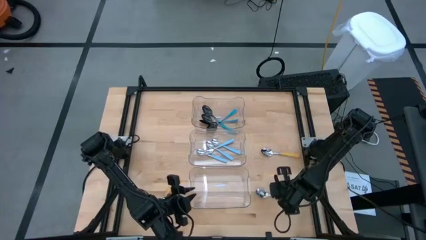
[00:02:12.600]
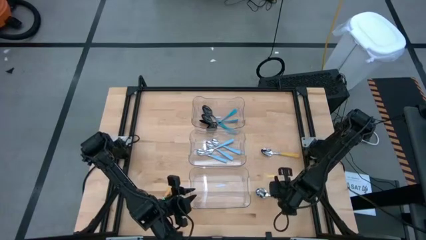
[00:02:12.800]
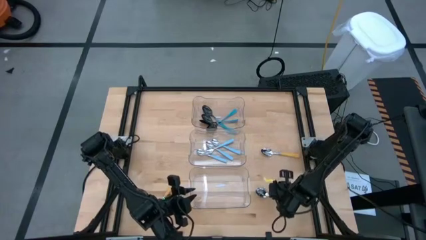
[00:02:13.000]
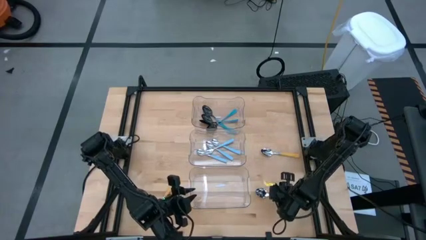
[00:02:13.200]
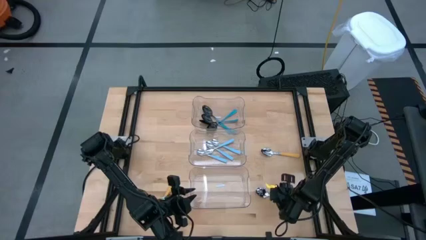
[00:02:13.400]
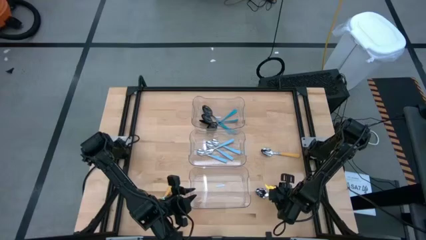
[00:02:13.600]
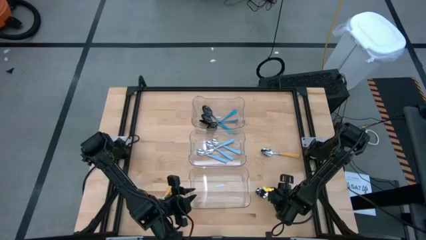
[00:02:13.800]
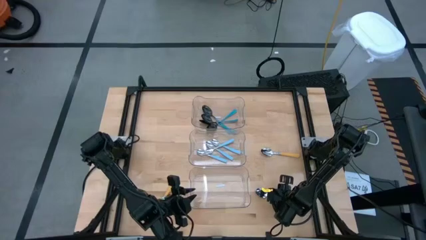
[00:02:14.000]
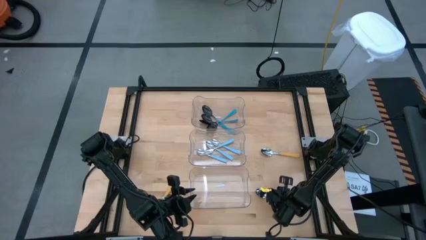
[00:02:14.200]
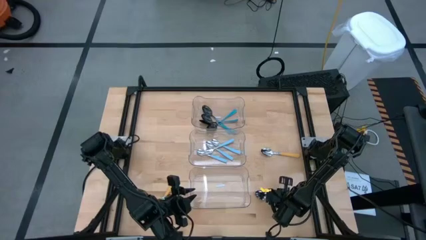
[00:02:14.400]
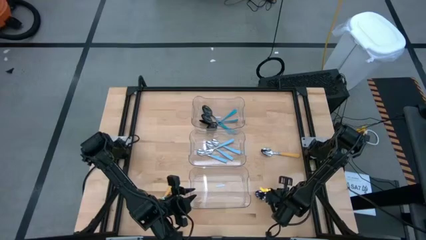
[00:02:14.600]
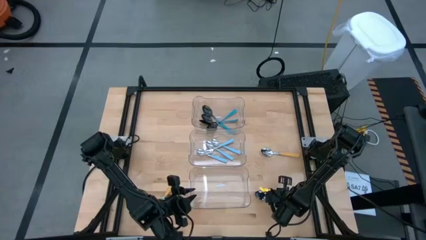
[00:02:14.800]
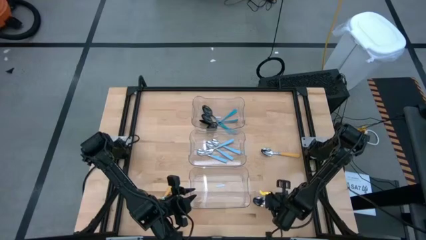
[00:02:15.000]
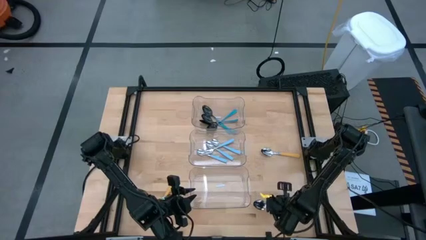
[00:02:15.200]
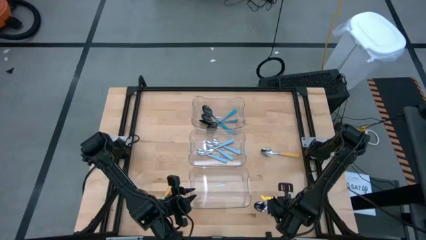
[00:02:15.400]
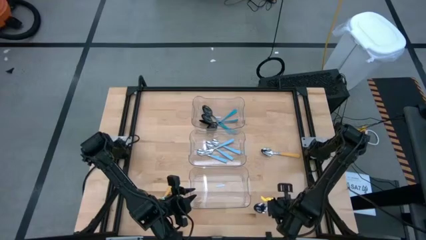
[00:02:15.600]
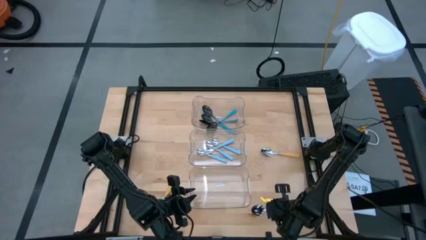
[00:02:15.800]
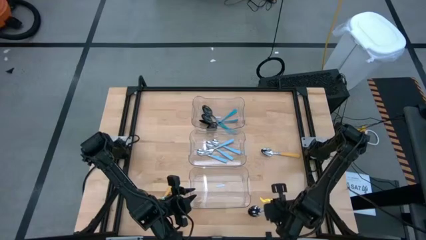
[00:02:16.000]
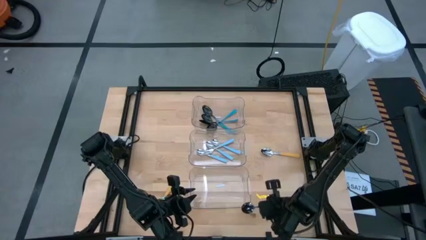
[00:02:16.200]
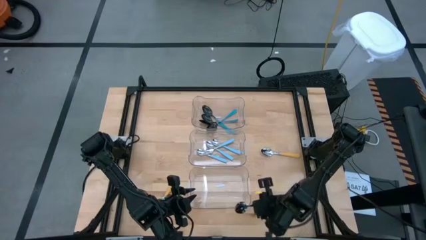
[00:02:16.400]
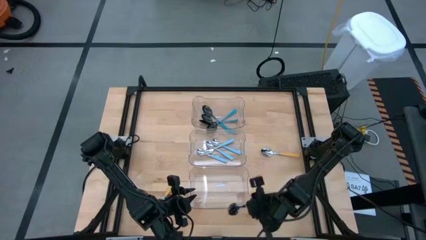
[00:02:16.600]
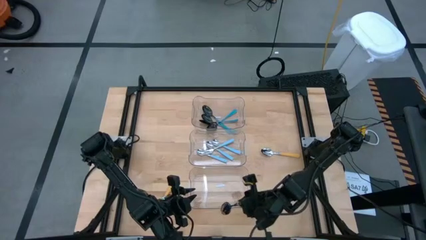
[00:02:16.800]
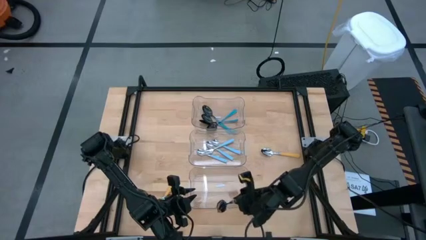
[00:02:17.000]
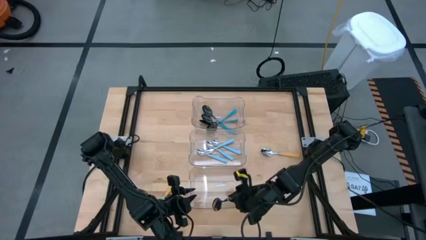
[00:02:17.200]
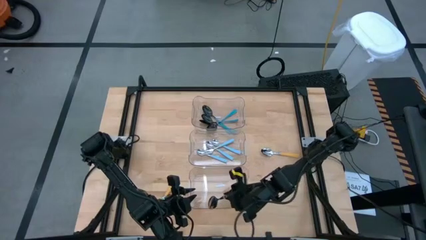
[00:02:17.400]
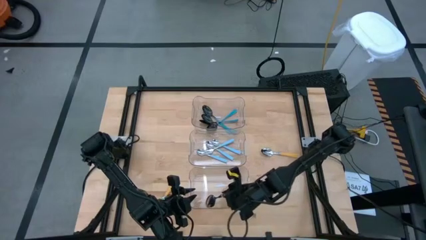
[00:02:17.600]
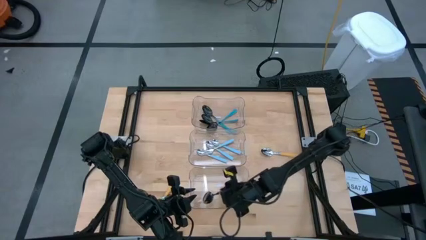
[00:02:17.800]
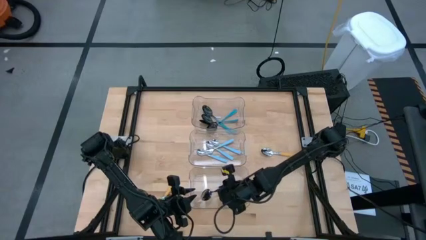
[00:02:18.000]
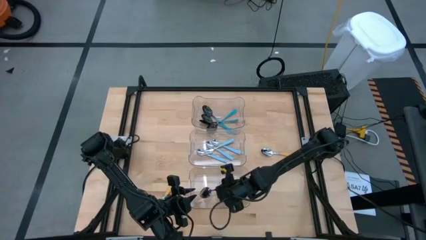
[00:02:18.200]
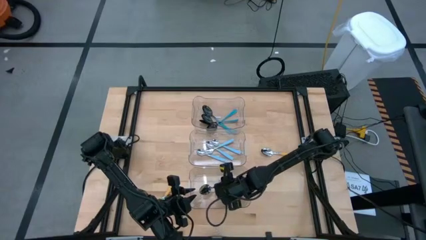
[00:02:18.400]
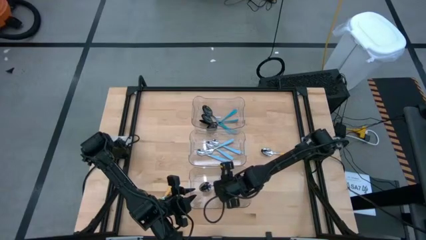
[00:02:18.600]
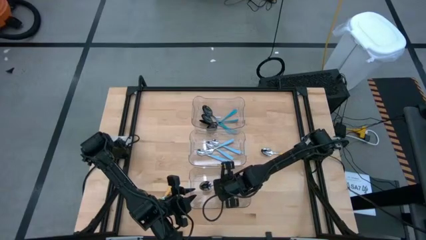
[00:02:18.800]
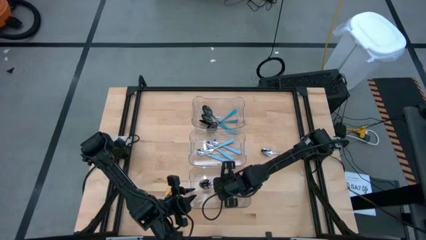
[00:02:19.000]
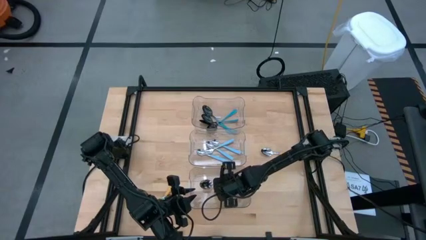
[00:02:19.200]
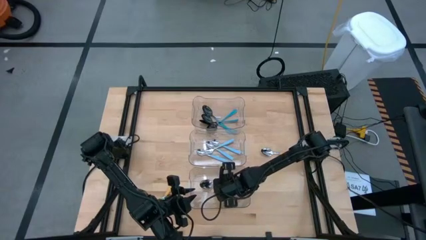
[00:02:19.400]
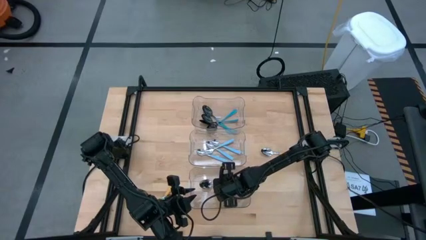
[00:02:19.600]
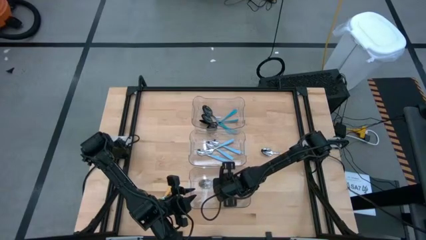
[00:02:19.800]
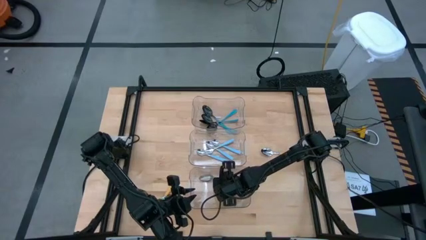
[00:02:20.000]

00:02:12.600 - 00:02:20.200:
Task: Sort silverware by color (type)
Put the yellow spoon into the bottom transparent bin

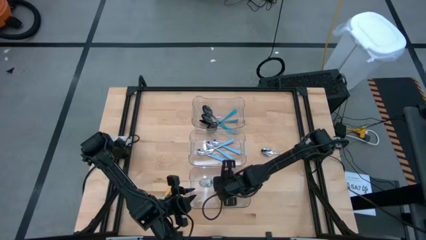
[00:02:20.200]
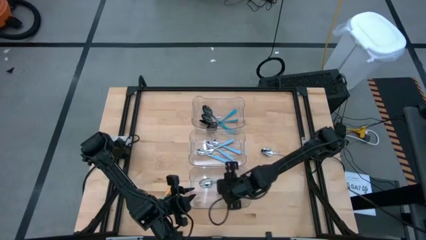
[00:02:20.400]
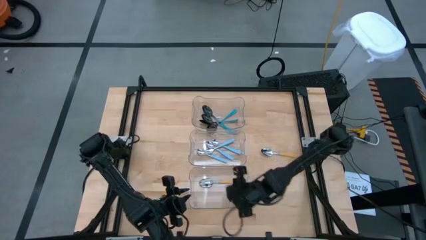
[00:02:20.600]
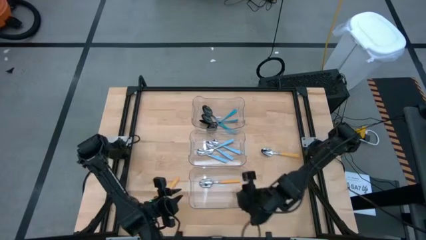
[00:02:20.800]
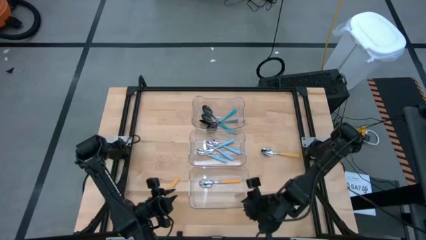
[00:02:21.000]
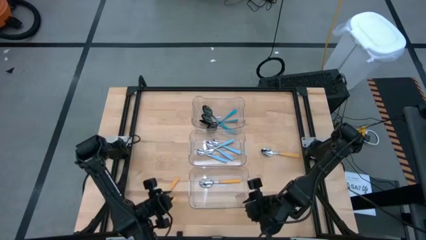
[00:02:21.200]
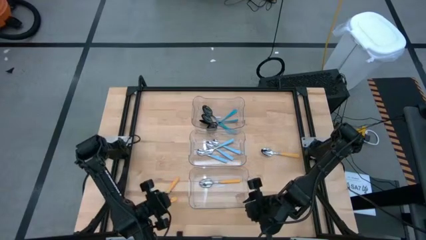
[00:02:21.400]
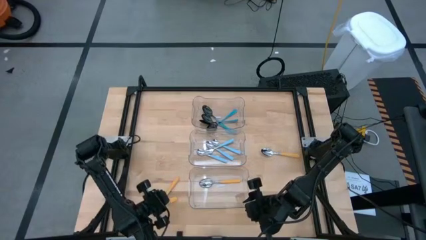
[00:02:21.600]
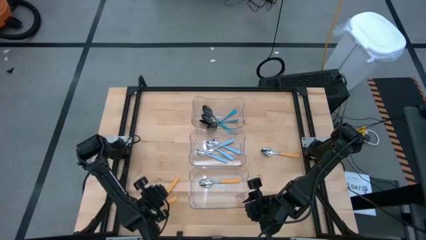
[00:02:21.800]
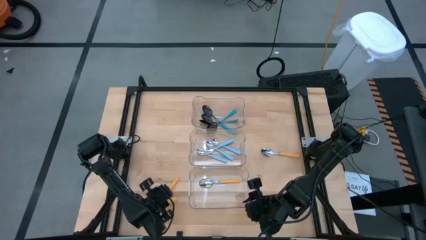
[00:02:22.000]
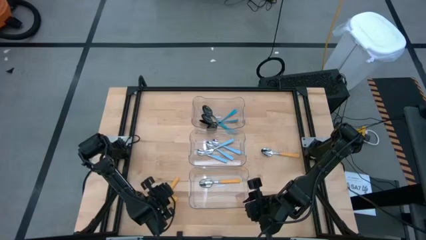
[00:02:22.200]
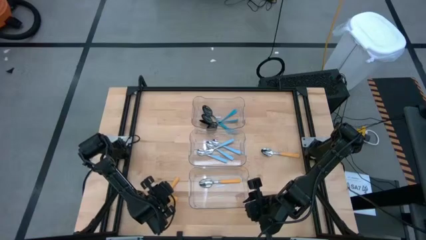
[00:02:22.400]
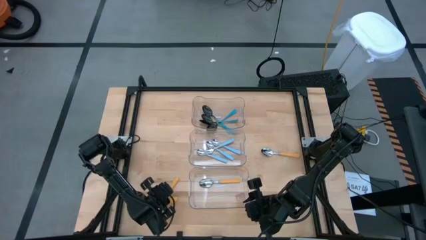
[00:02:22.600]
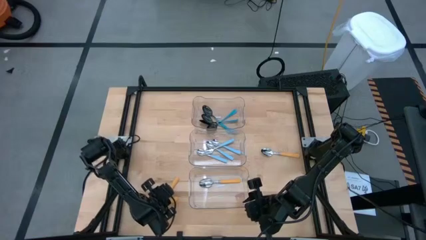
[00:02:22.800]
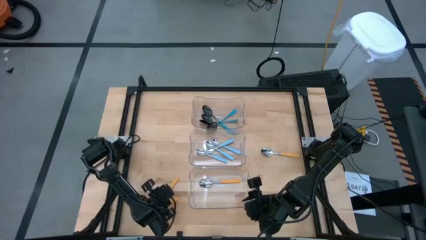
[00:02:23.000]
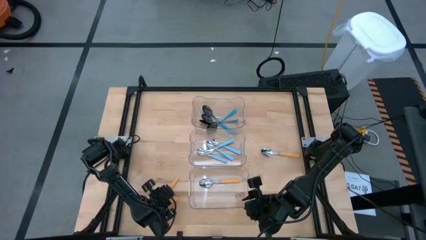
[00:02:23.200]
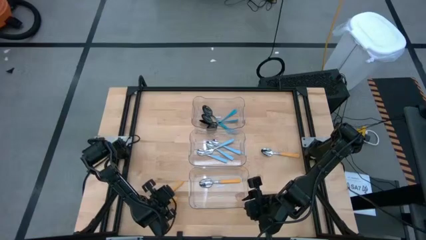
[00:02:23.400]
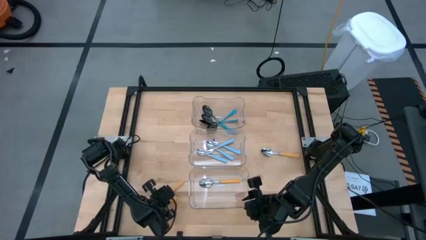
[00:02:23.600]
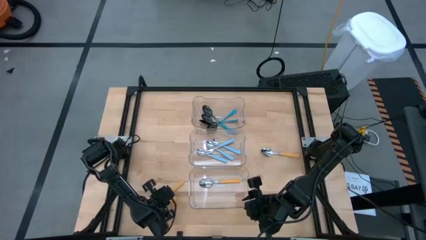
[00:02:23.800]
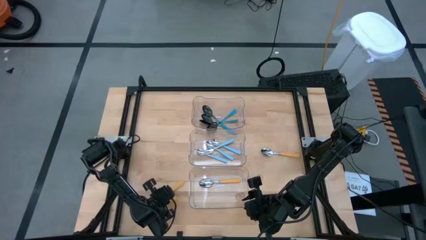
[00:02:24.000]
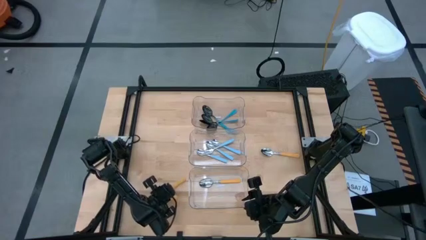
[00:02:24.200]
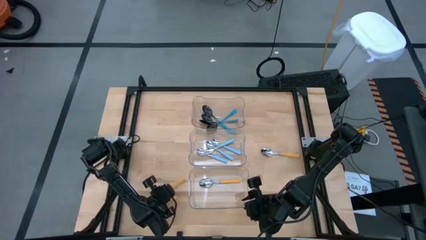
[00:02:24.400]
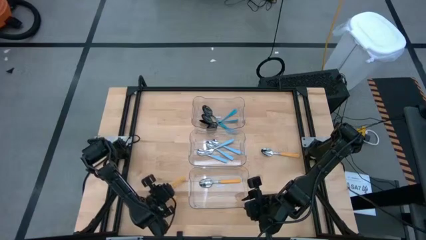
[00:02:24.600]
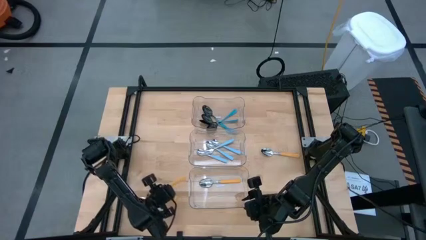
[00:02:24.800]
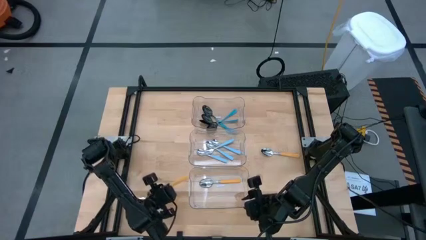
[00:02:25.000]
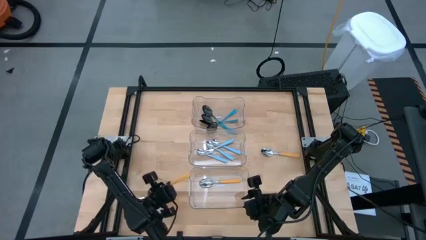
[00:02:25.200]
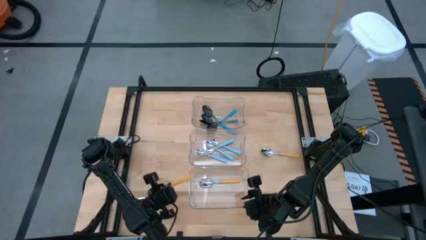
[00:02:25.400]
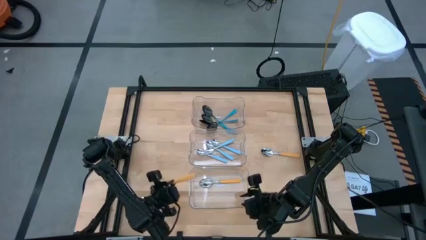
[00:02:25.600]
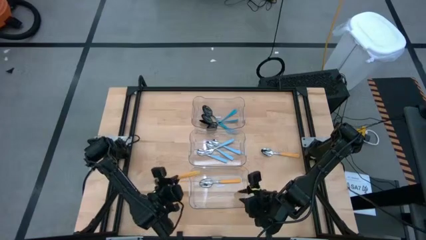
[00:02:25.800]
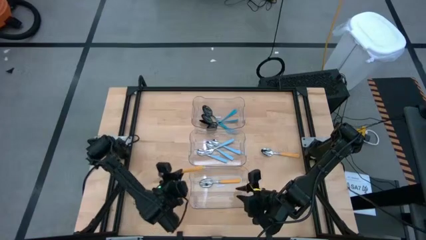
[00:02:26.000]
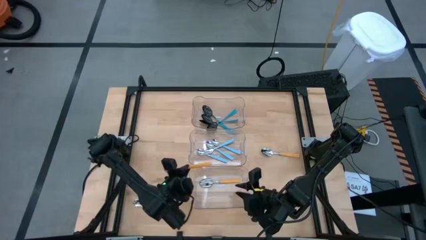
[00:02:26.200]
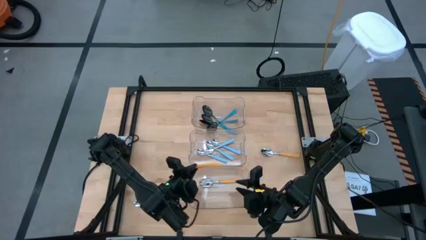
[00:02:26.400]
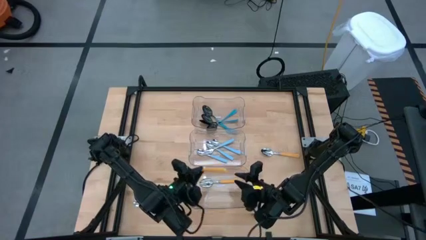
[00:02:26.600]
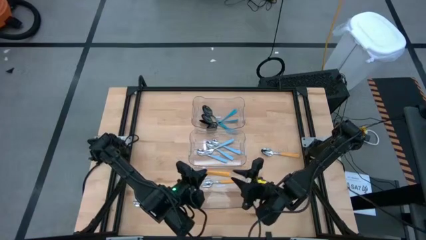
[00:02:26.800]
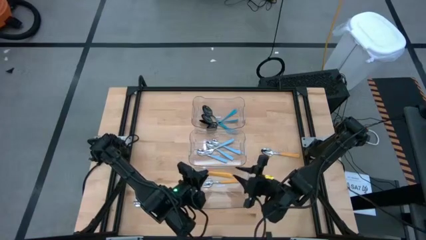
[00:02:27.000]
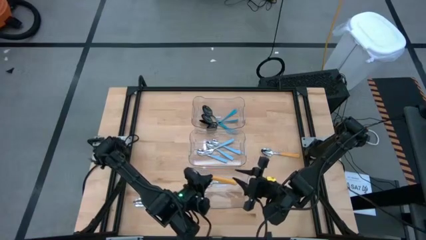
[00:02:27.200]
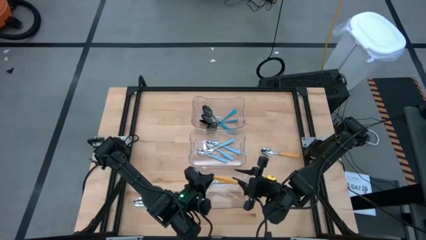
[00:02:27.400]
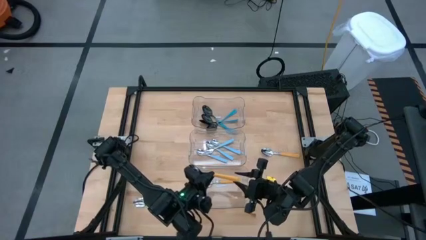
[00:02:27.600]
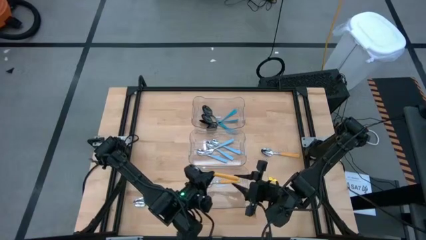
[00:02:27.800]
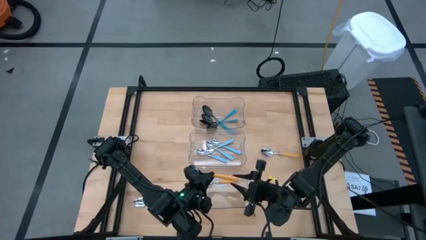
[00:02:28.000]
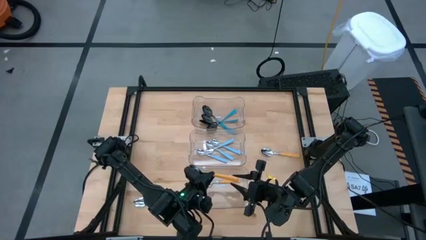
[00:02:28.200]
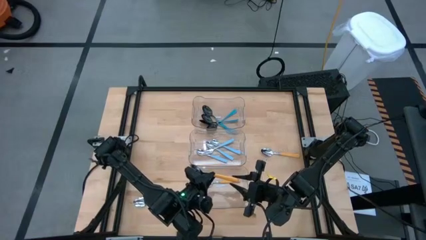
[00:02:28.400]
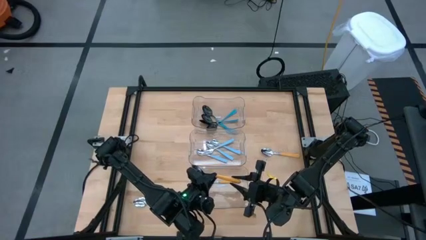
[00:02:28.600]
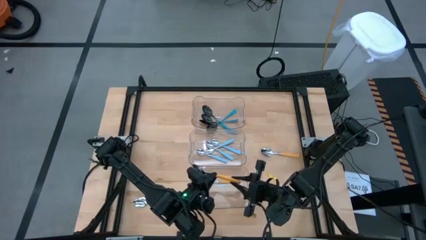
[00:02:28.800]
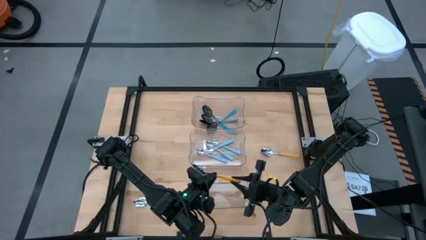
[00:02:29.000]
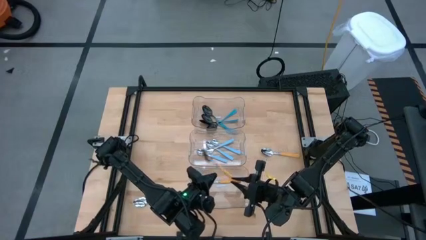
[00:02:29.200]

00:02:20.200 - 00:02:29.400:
Put the yellow spoon into the bottom transparent bin
